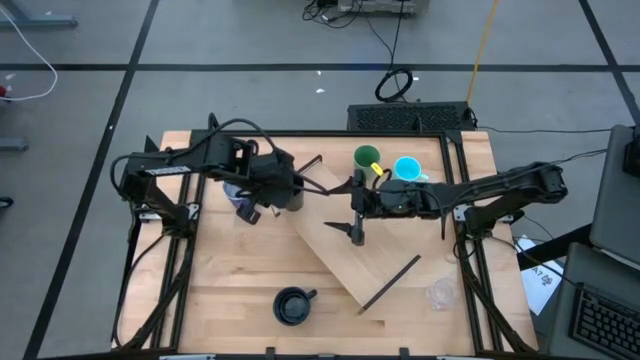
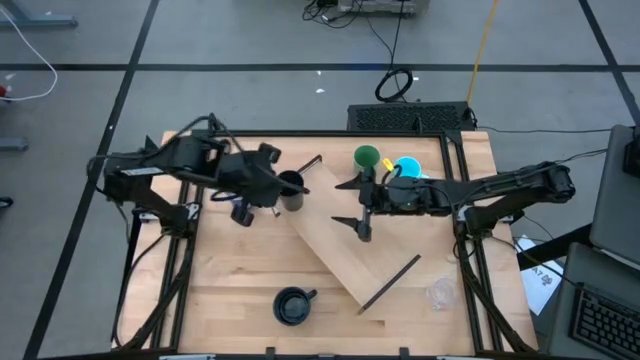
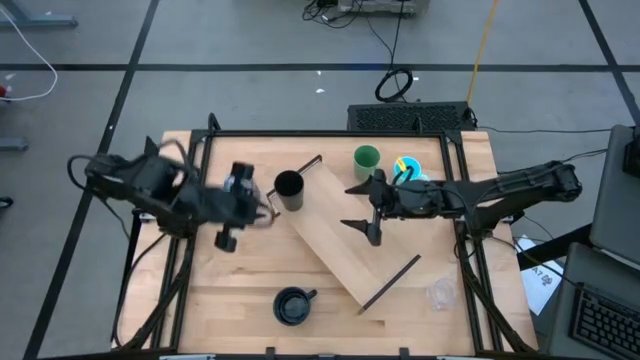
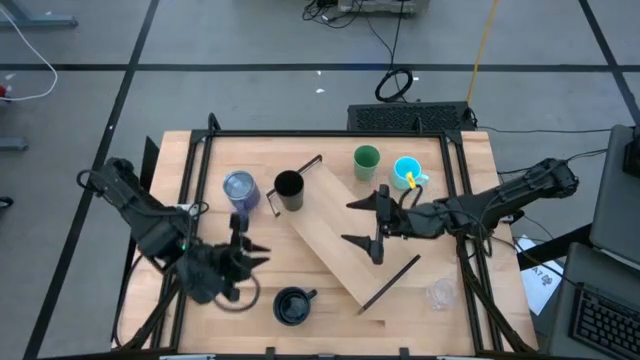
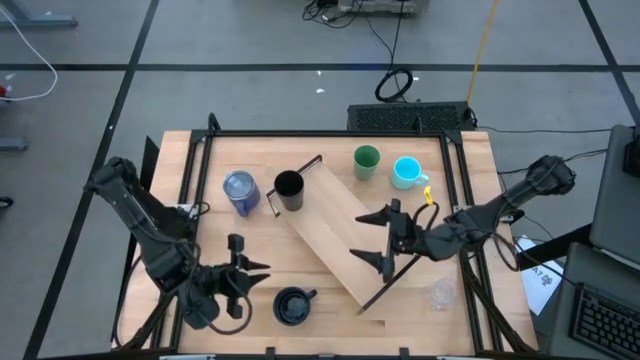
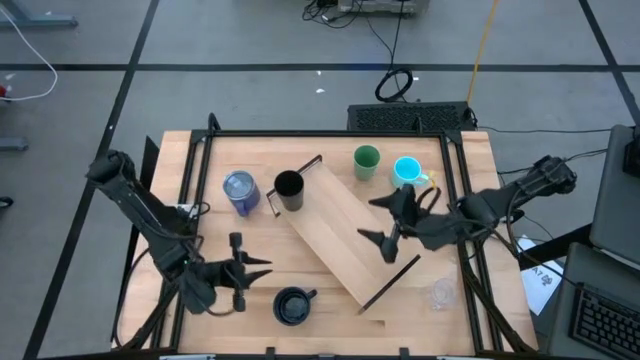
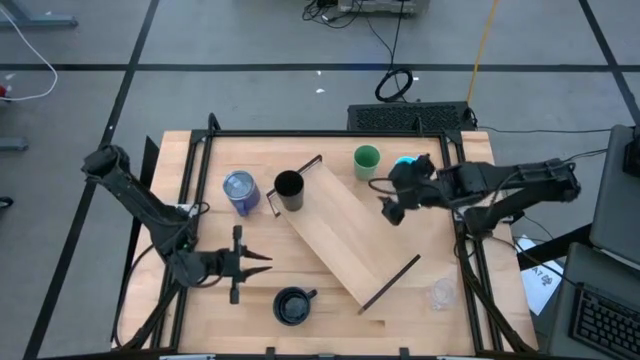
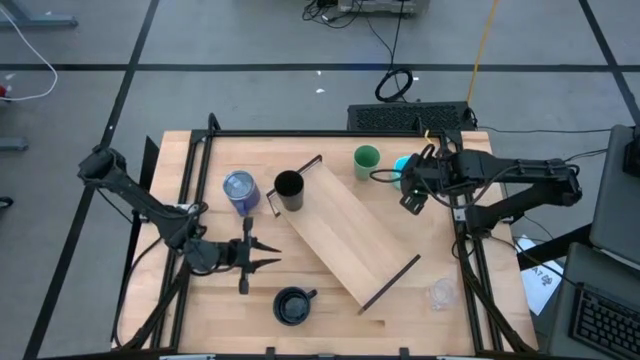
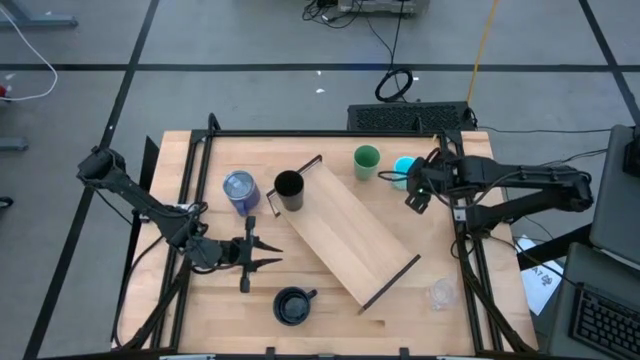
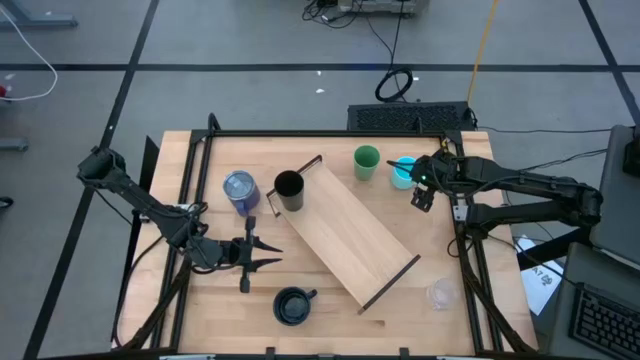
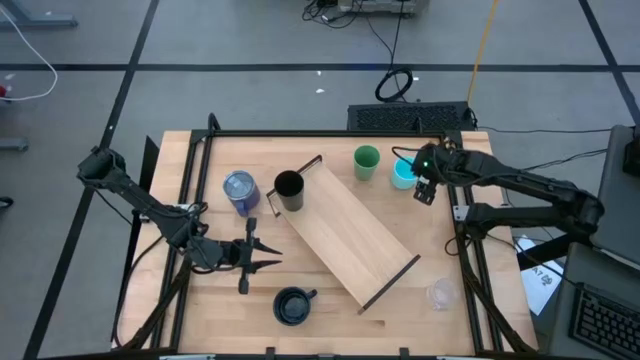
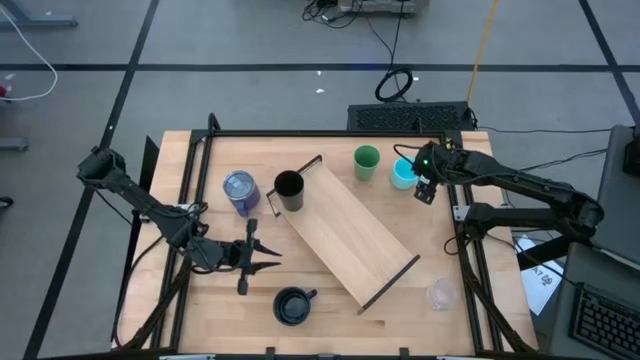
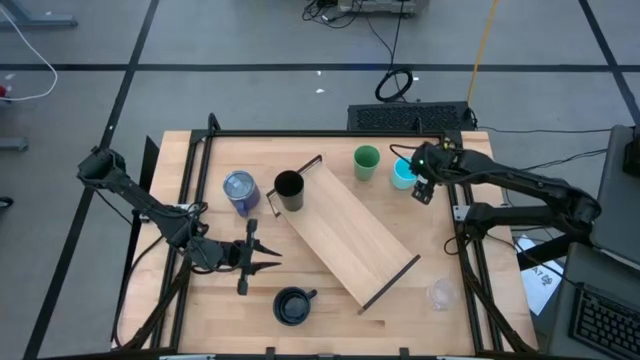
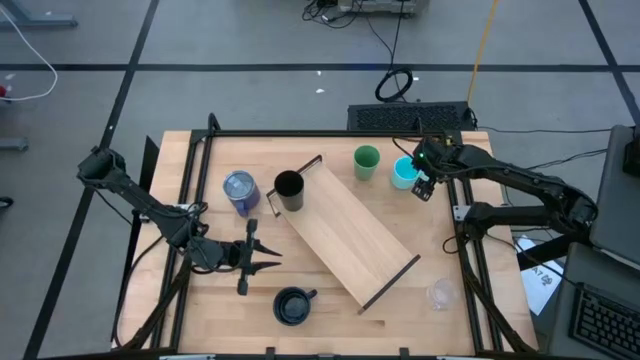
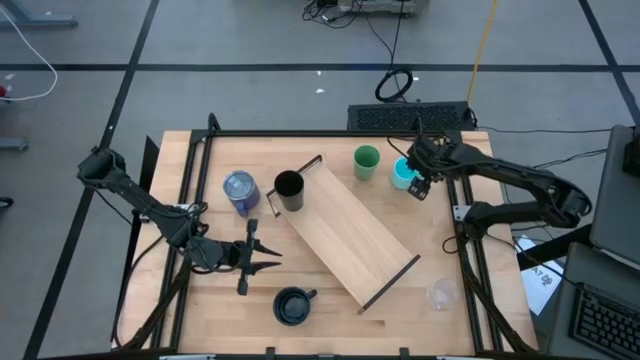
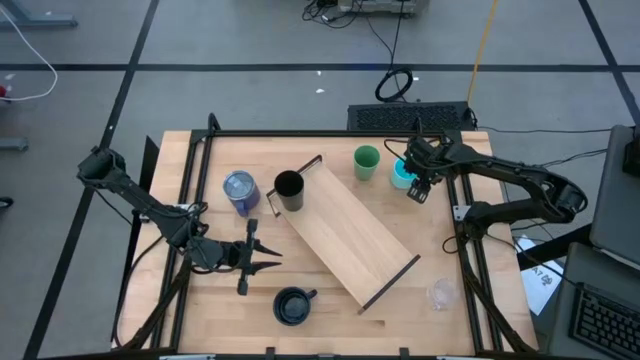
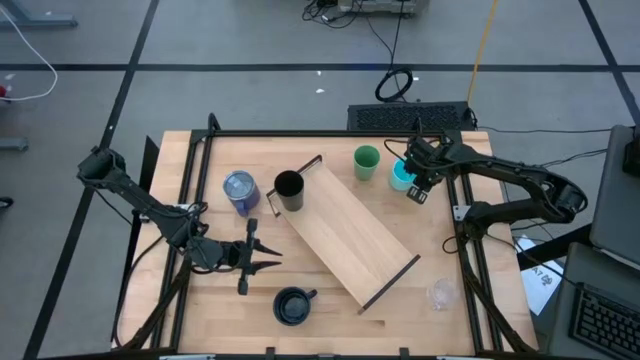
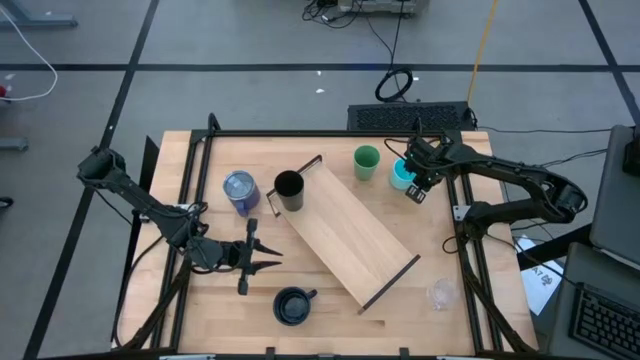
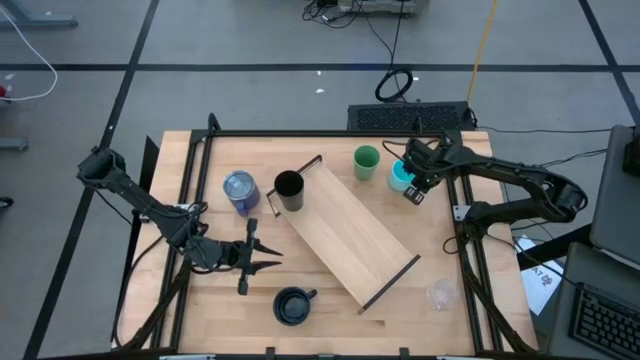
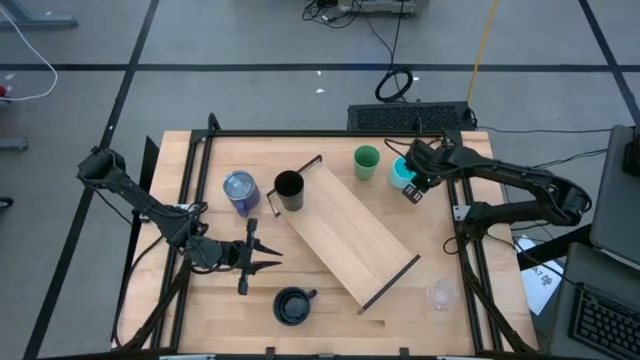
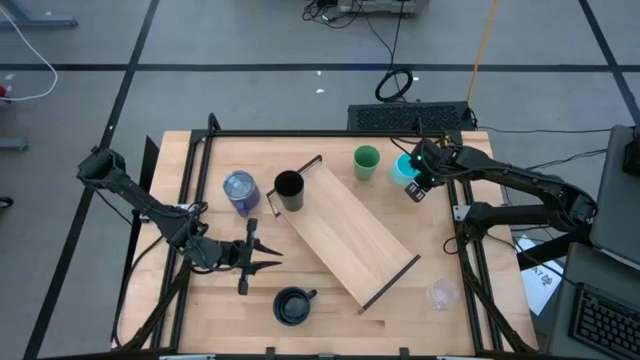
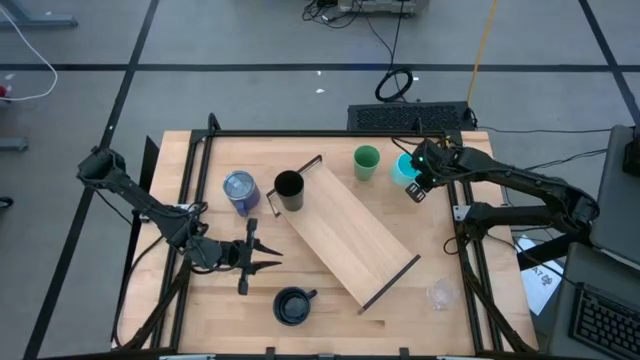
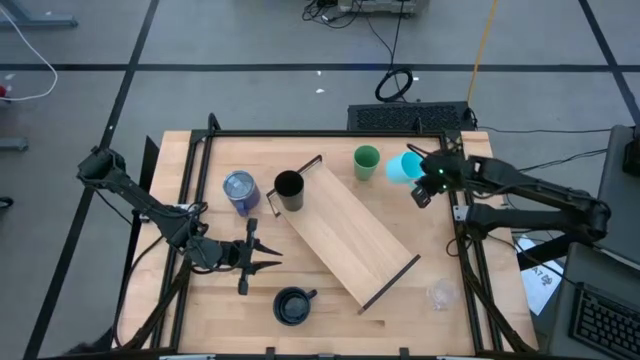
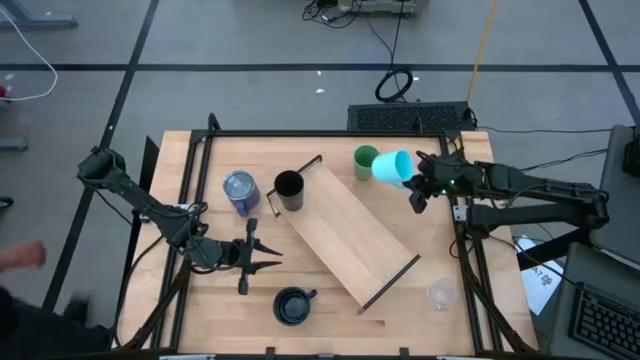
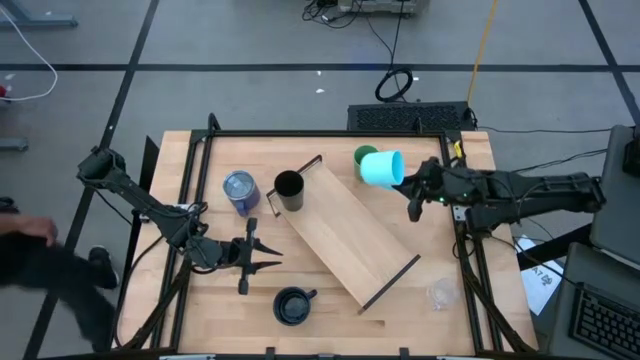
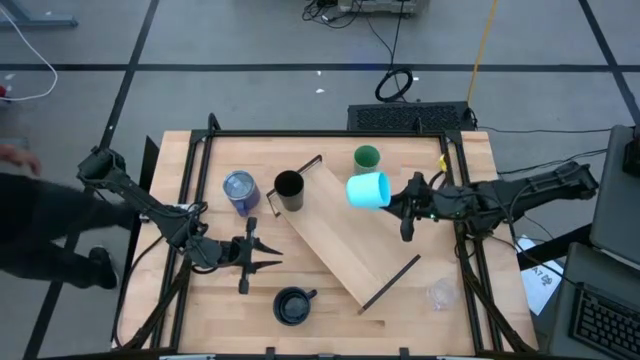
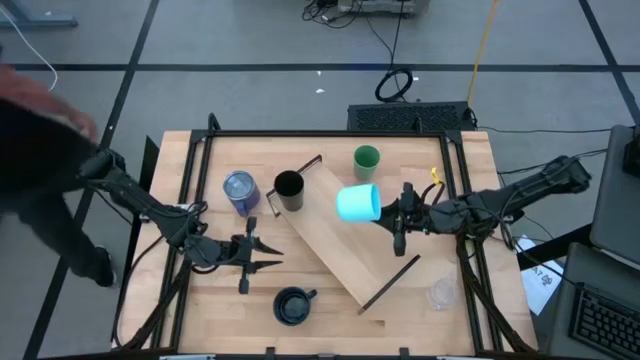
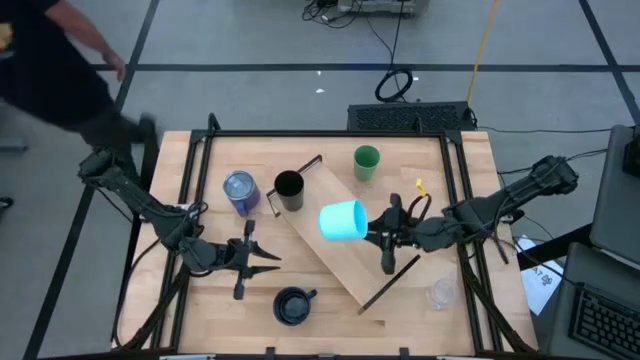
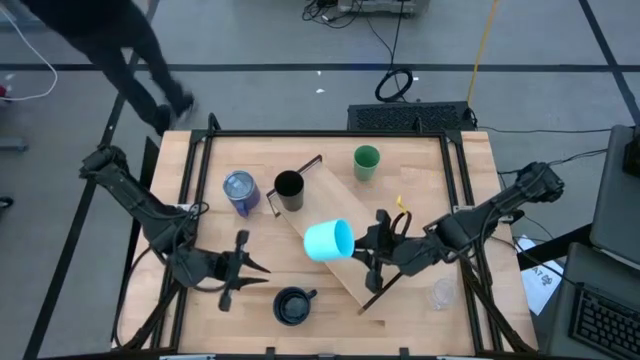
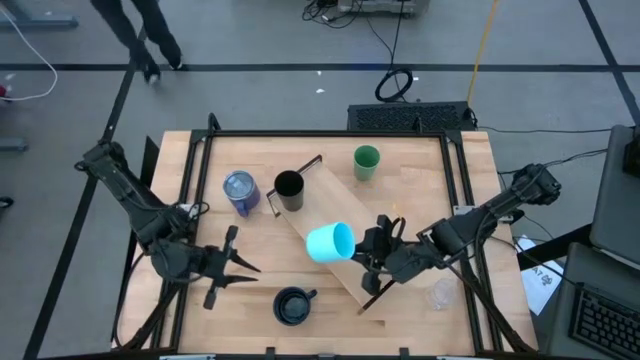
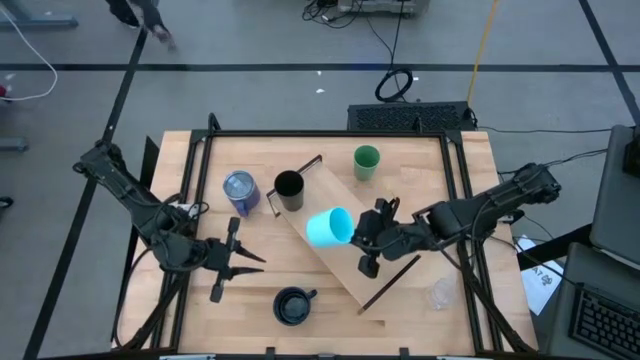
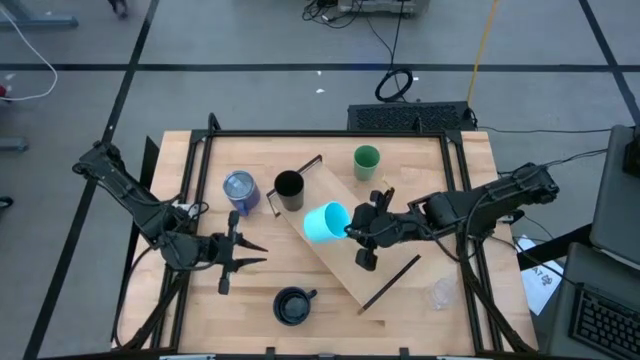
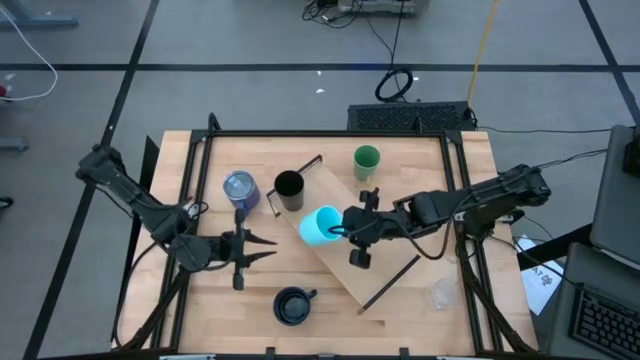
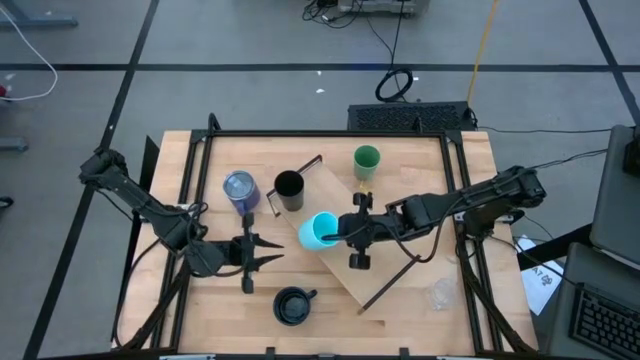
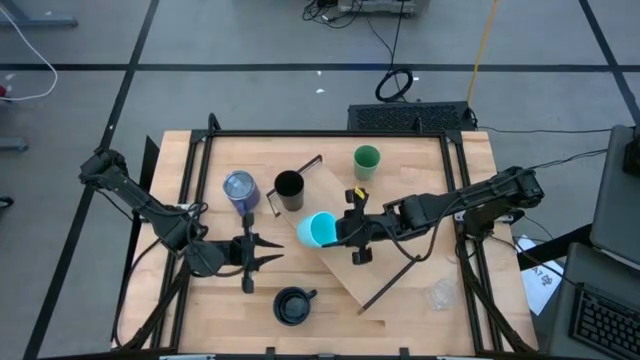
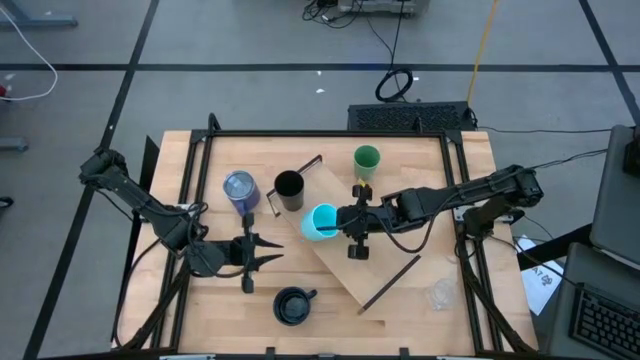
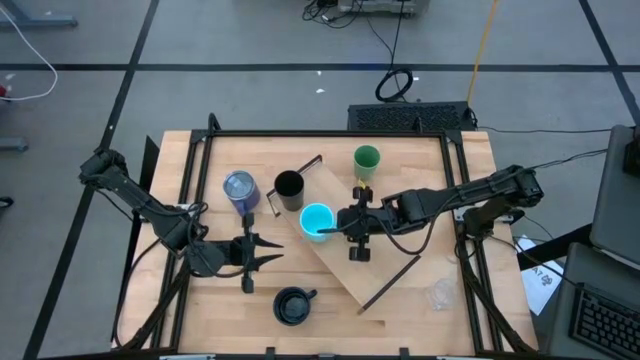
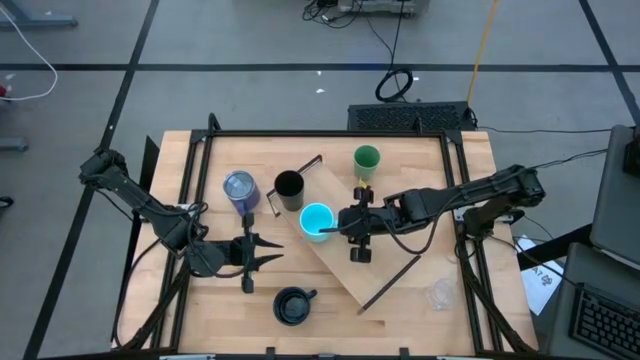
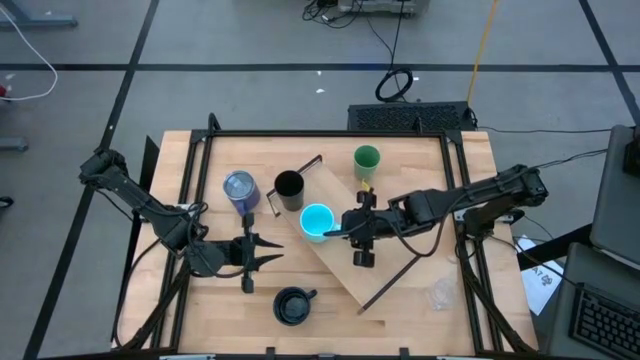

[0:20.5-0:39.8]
Task: Stack small to large cups/mugs on shelf
Put the light blue mug on the shelf
